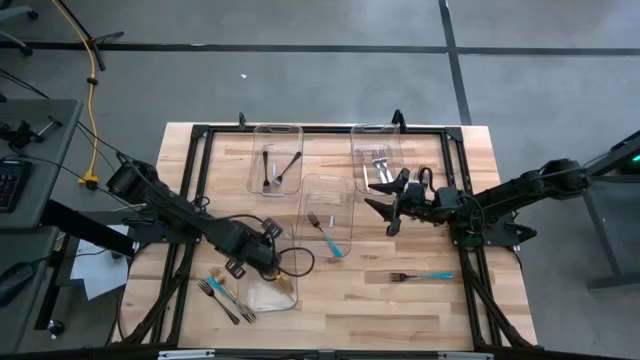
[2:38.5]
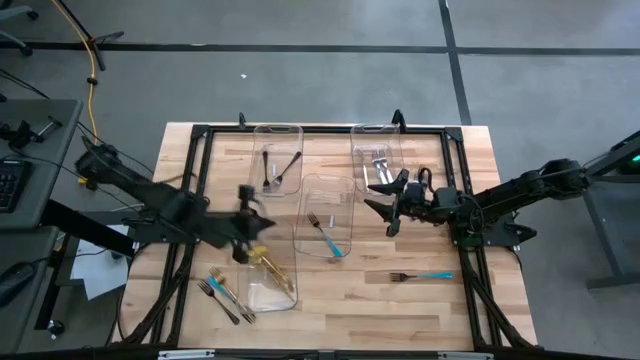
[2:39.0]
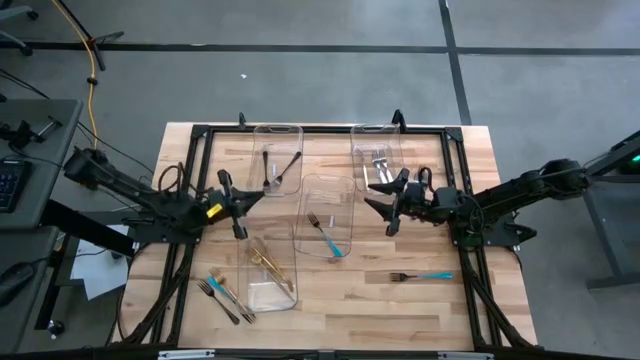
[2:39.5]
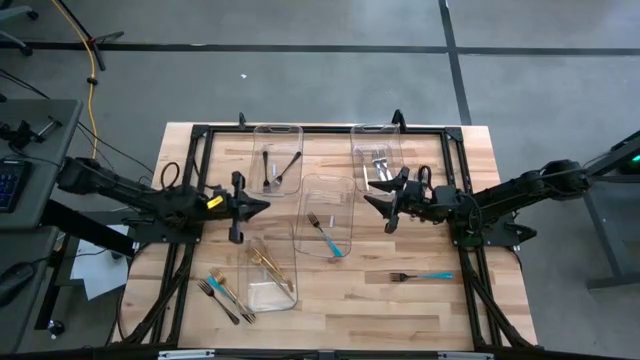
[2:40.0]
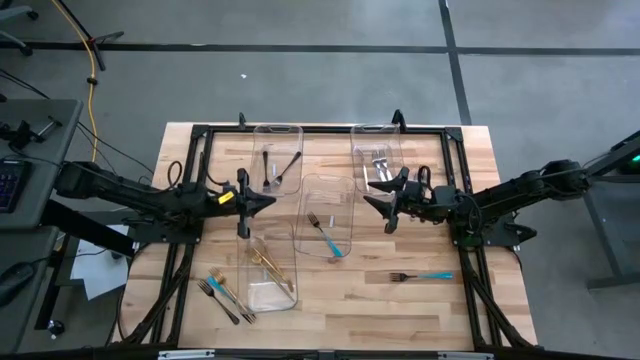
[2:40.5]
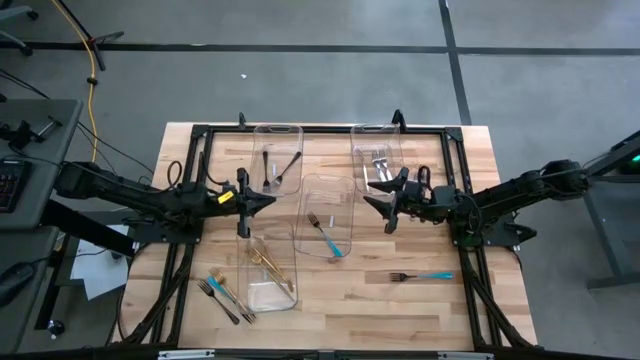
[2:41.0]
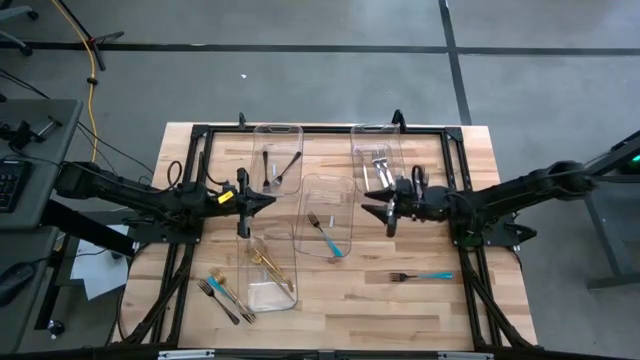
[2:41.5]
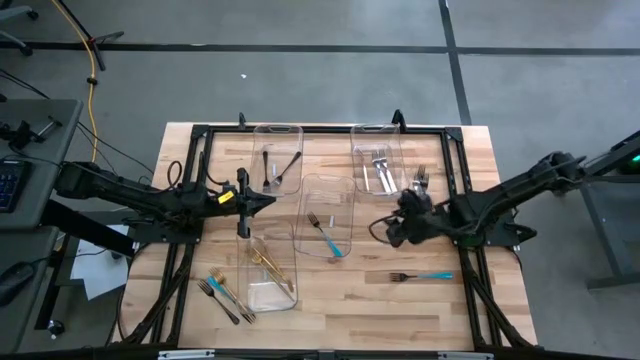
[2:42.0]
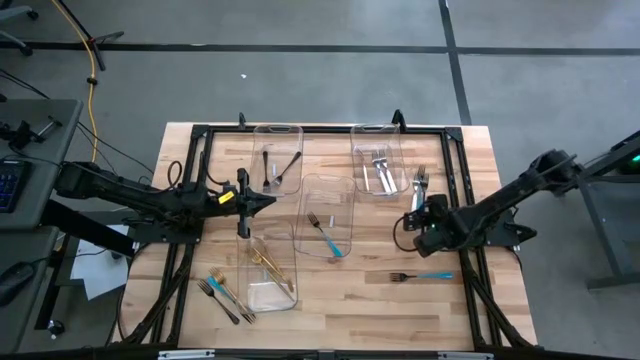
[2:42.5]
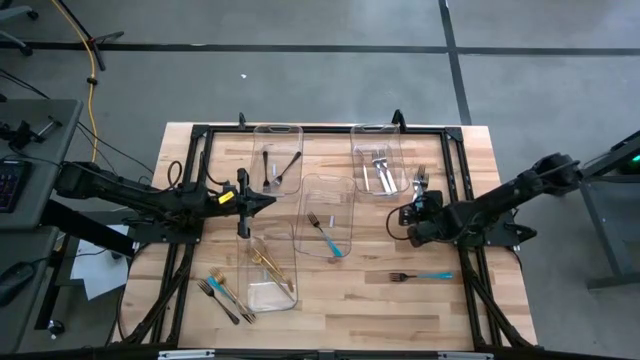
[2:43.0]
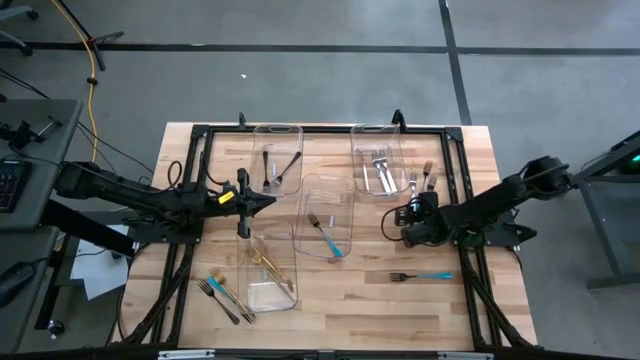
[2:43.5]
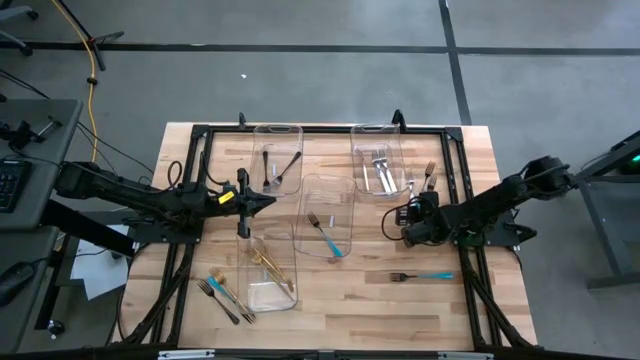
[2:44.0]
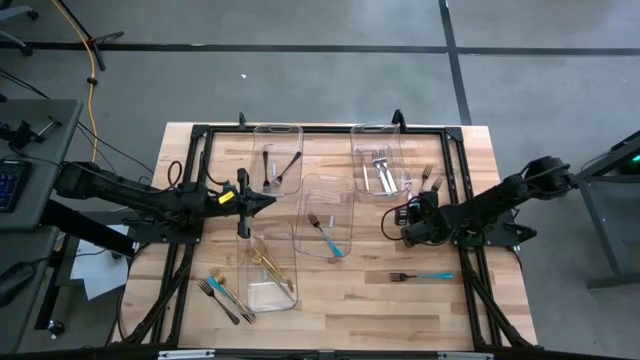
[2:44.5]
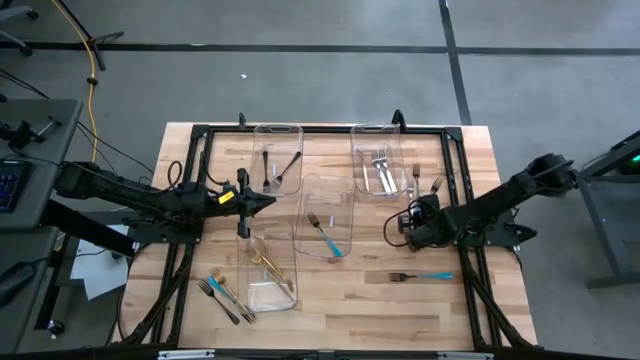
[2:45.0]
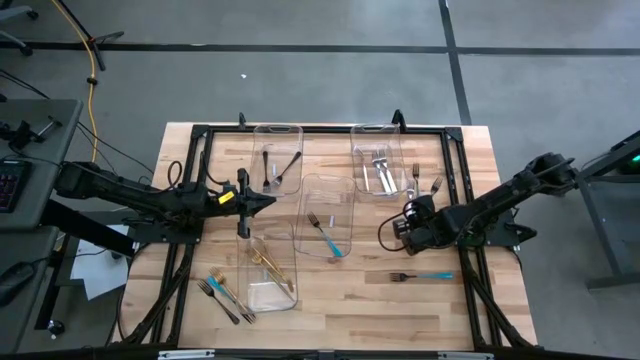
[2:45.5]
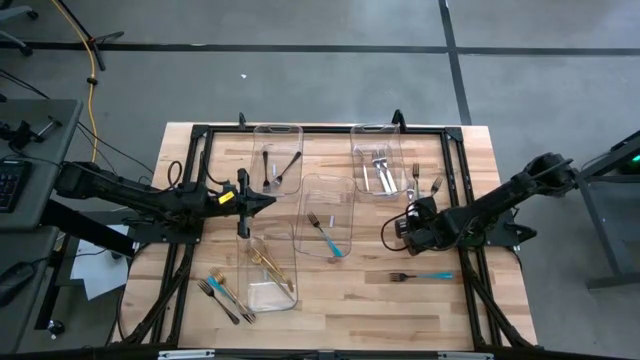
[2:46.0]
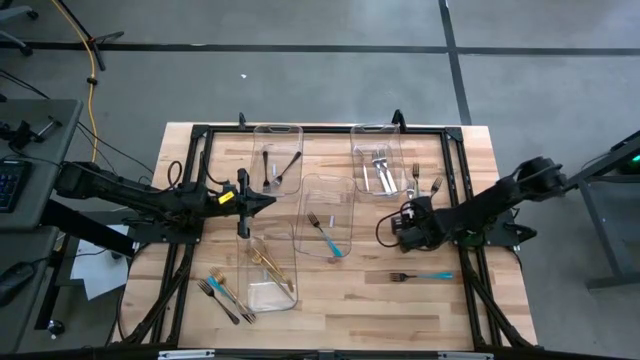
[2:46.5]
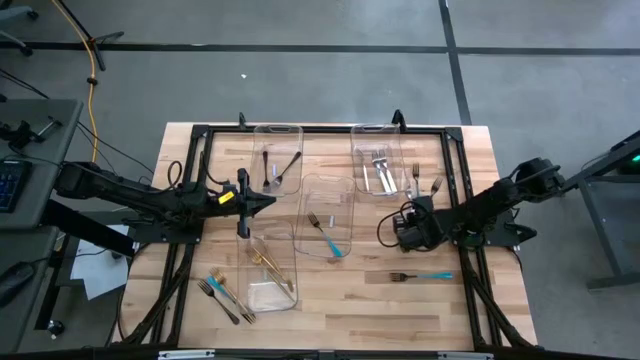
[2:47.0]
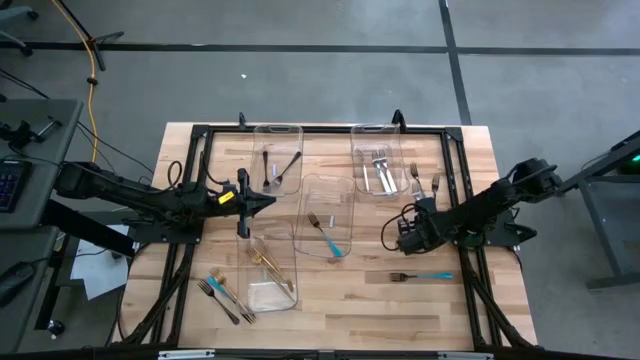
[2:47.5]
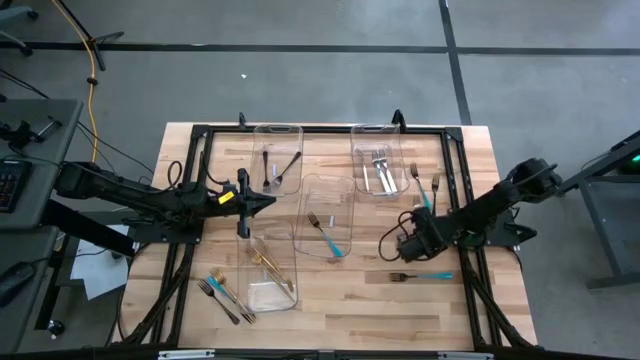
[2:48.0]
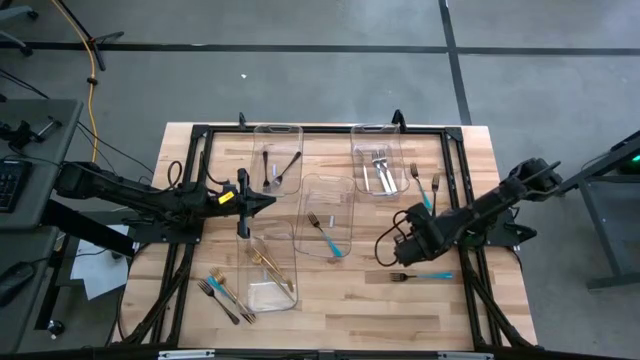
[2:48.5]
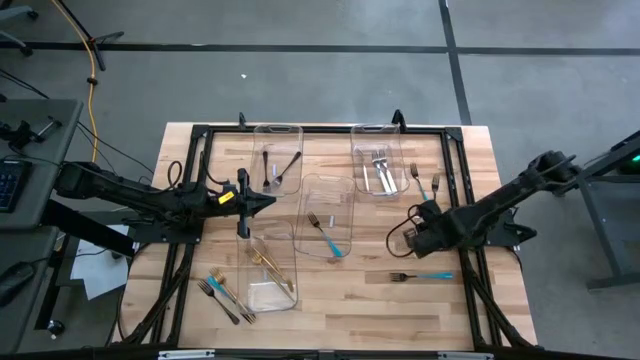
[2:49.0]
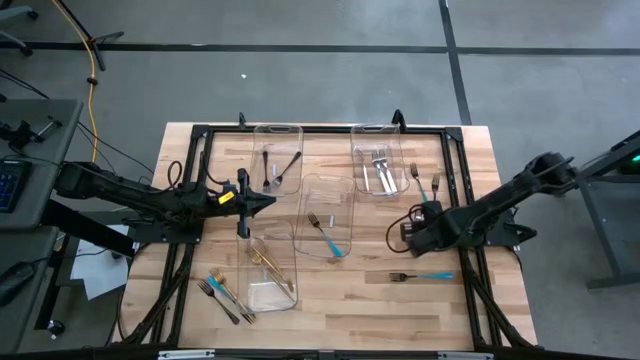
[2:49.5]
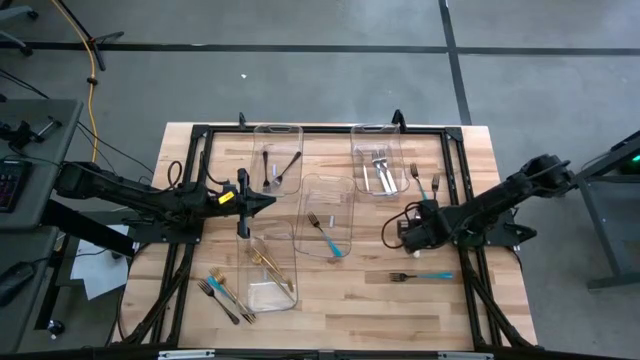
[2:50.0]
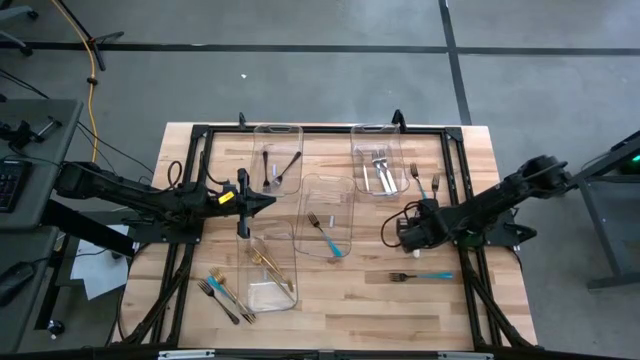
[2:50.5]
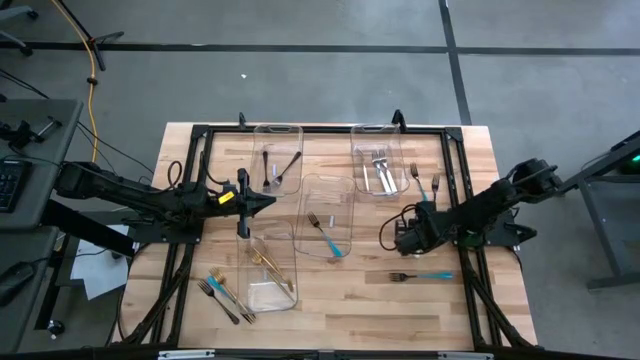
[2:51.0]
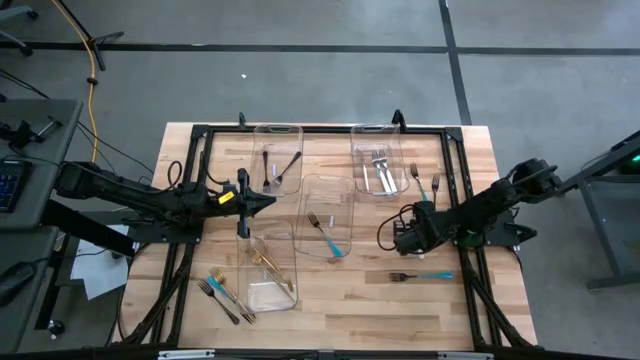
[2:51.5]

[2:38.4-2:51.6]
Task: Sort silverware by color (type)
Put the white fork into the top right transparent bin

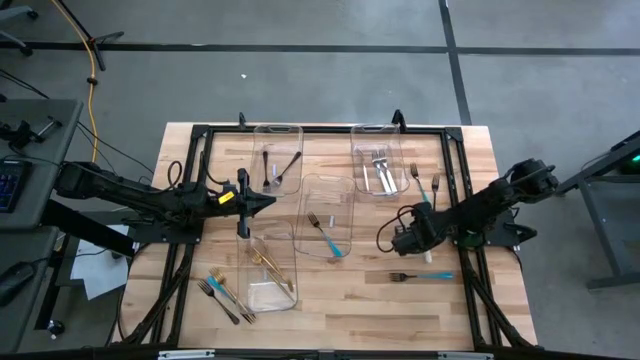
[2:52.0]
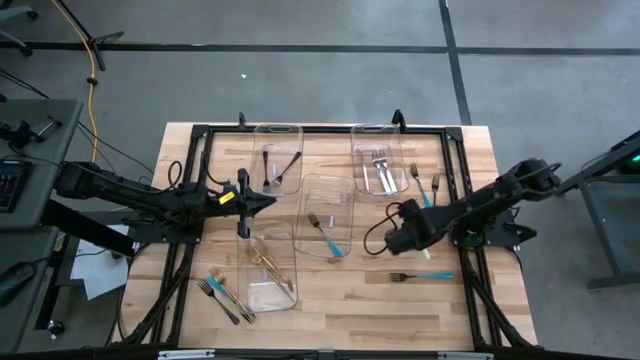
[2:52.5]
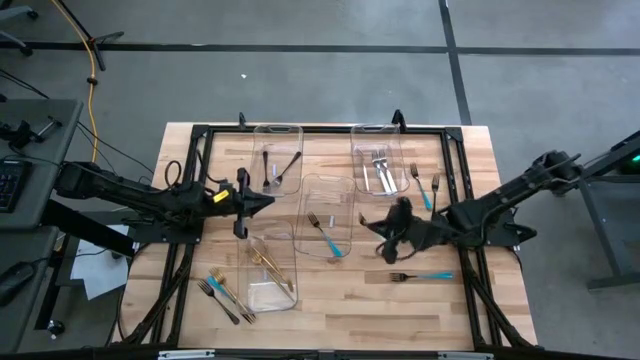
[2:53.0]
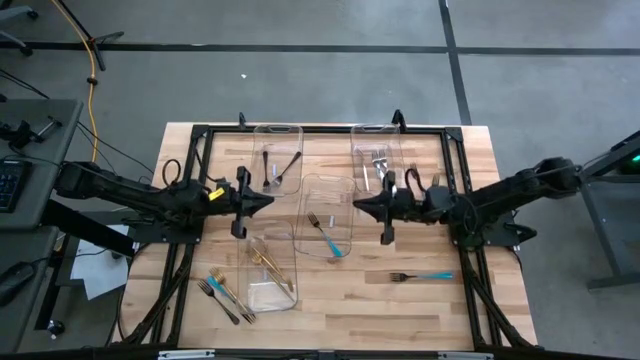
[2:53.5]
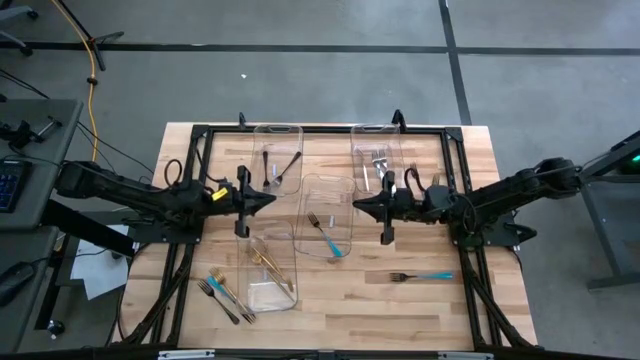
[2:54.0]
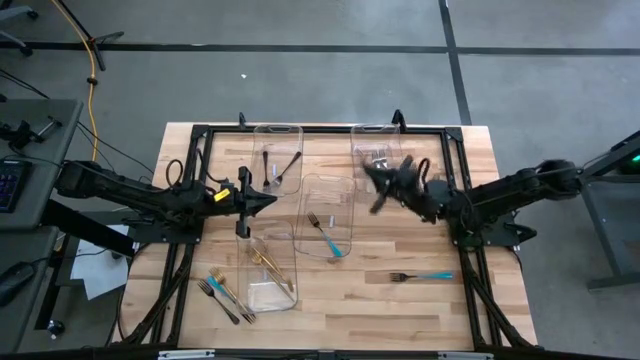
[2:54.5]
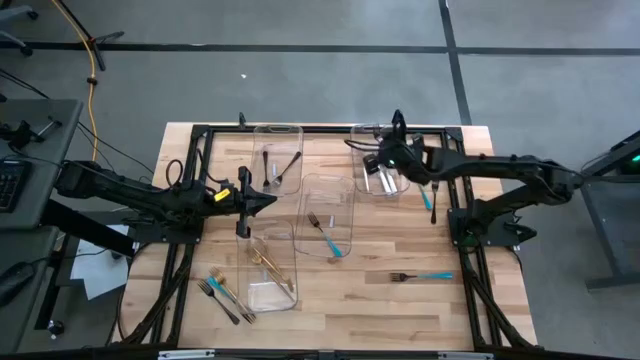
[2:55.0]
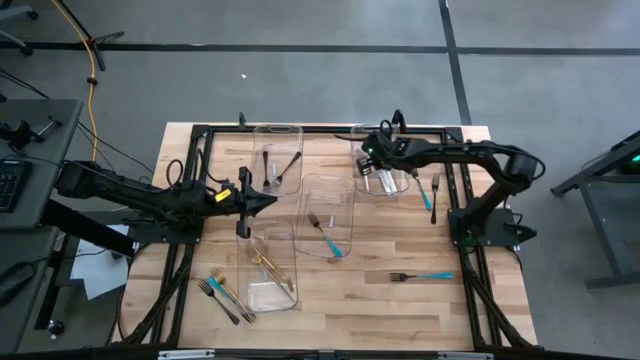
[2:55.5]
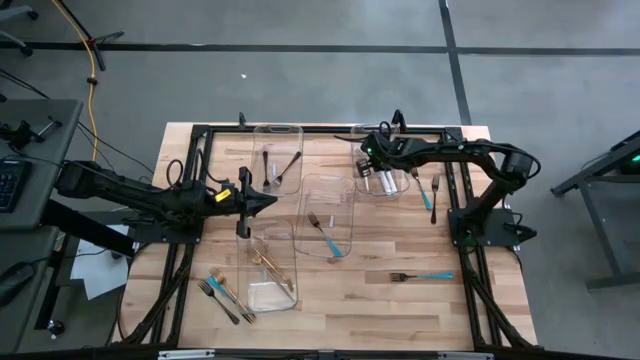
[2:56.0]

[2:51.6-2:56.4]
Put the white fork into the top right transparent bin

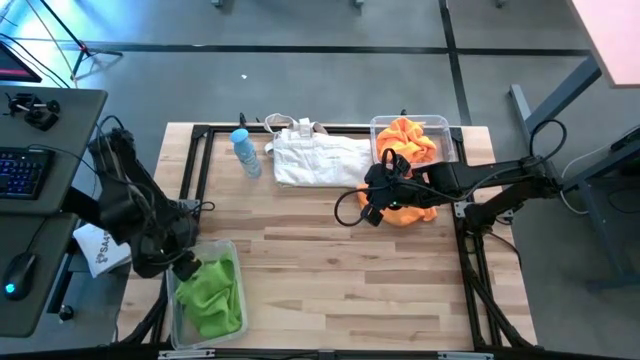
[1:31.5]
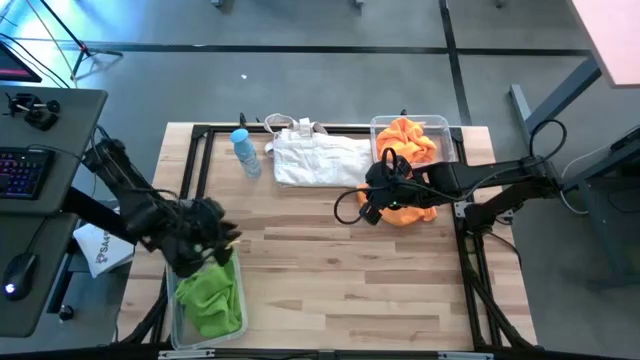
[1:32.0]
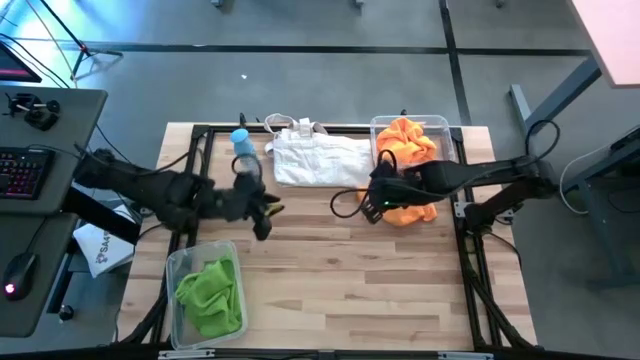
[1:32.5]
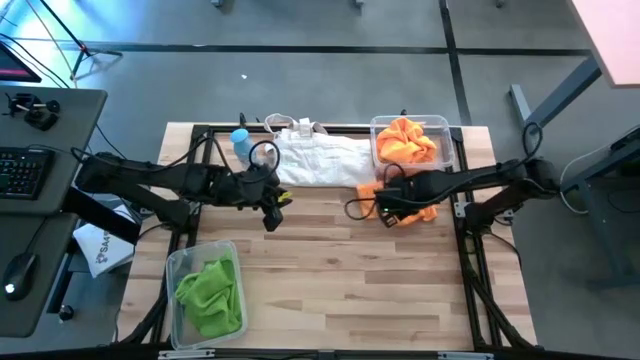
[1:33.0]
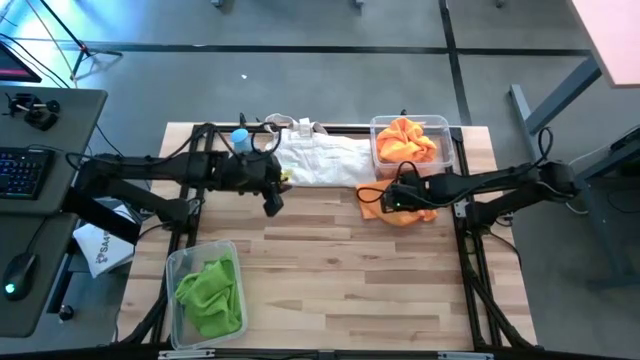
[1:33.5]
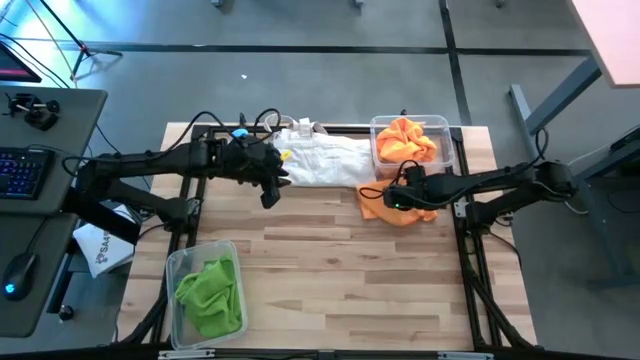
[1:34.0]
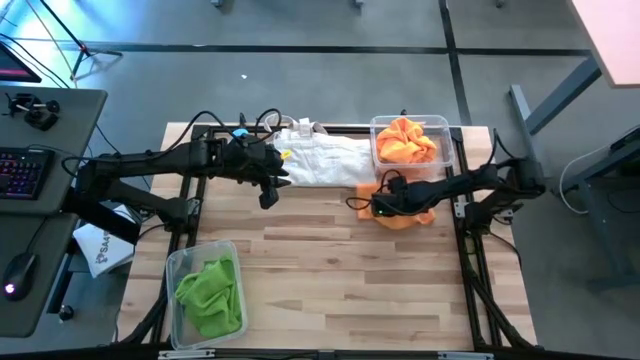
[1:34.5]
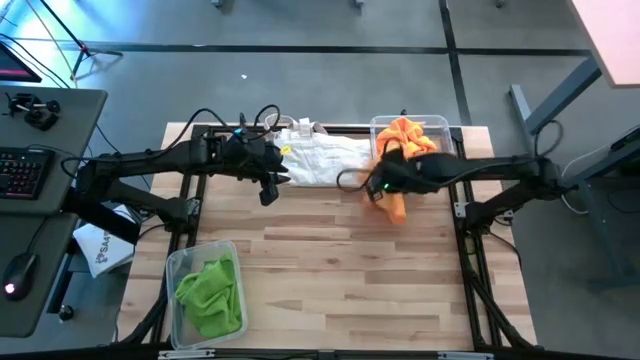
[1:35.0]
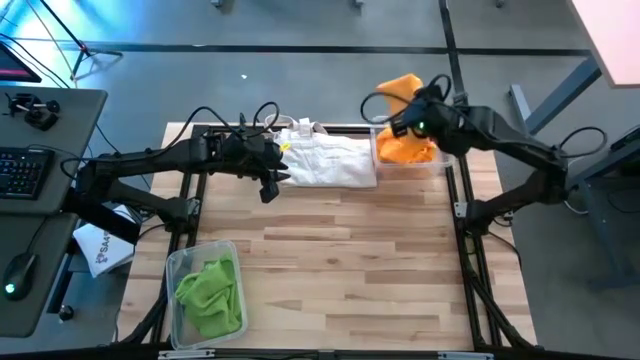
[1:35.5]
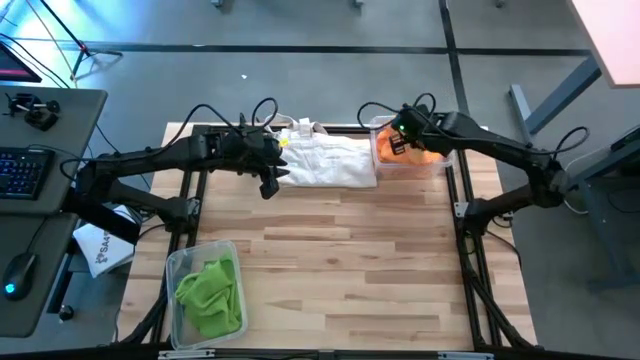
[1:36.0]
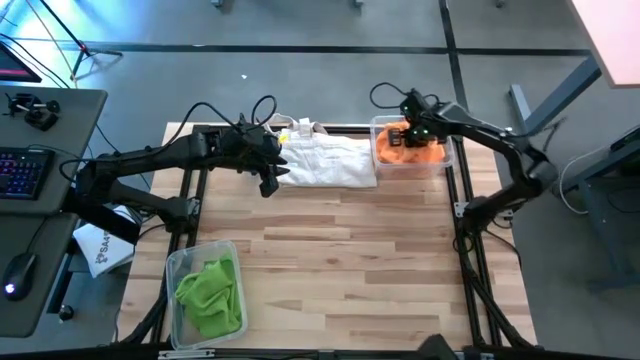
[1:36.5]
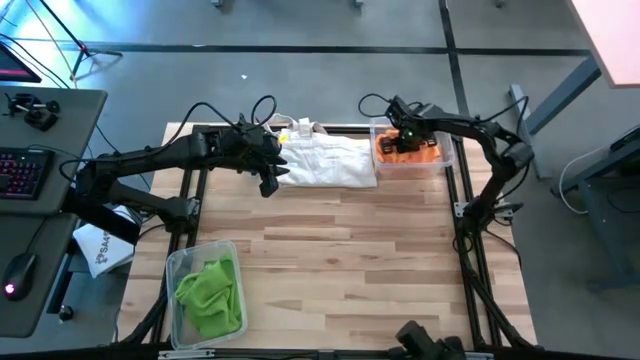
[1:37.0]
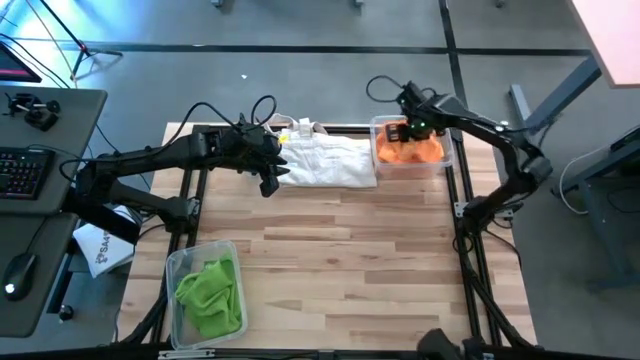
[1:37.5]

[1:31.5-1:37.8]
Task: Sort microfiber towel by color & place in baskets
Put the orange microfiber cloth into the top transparent bin
